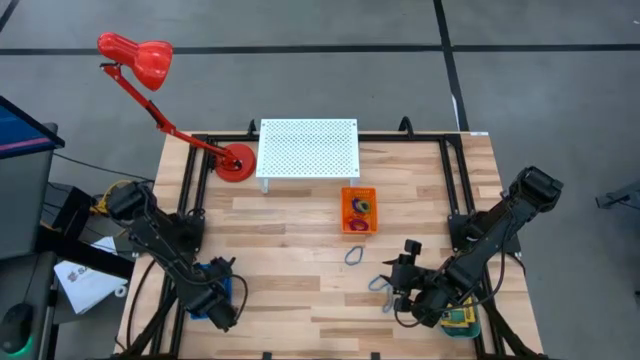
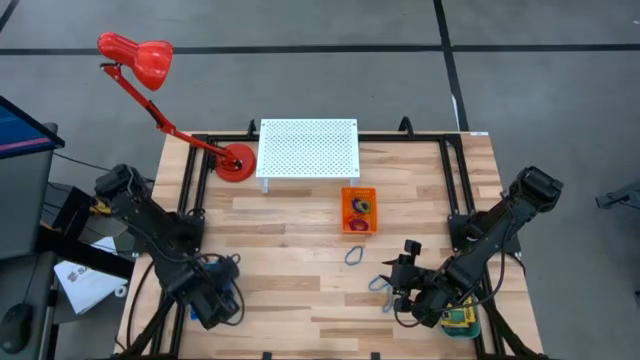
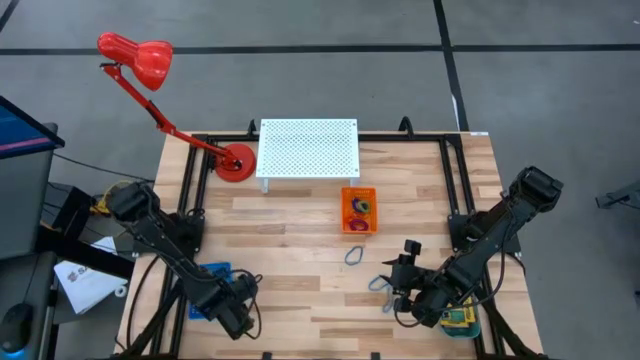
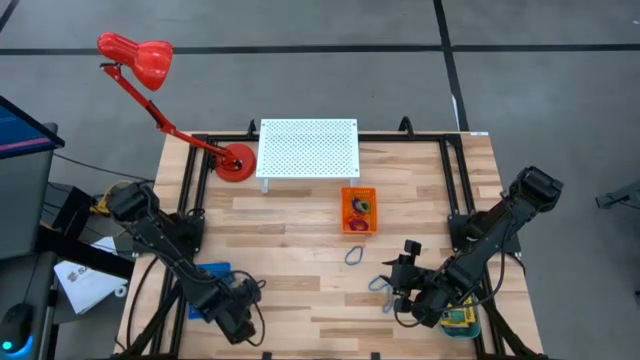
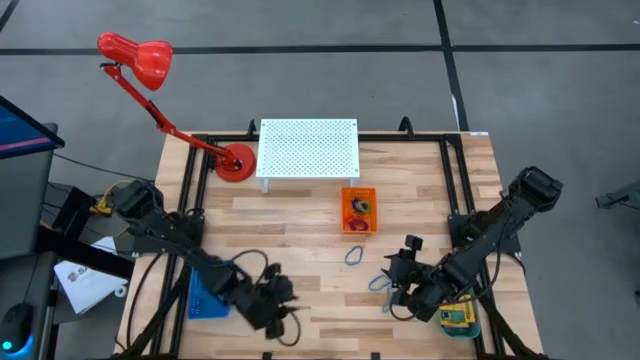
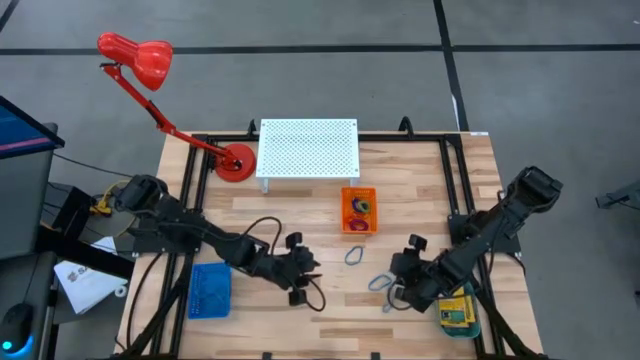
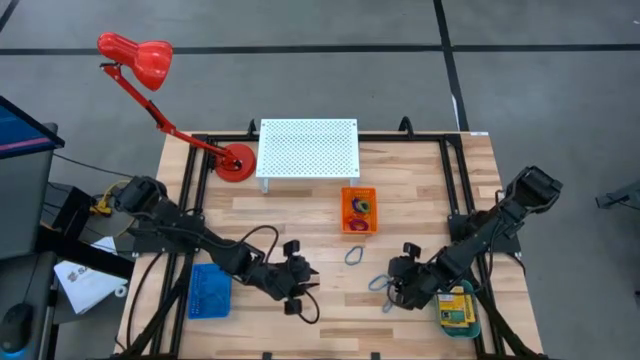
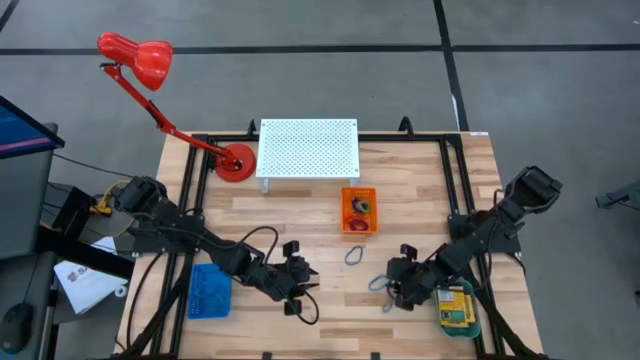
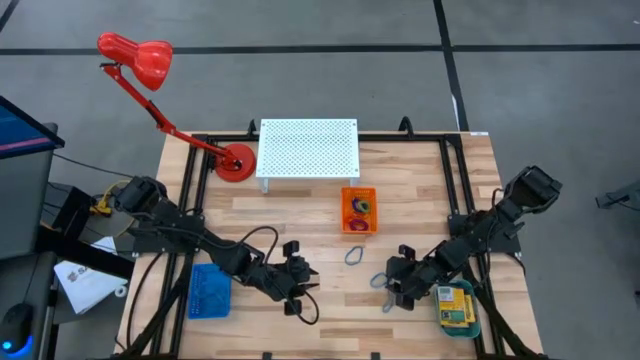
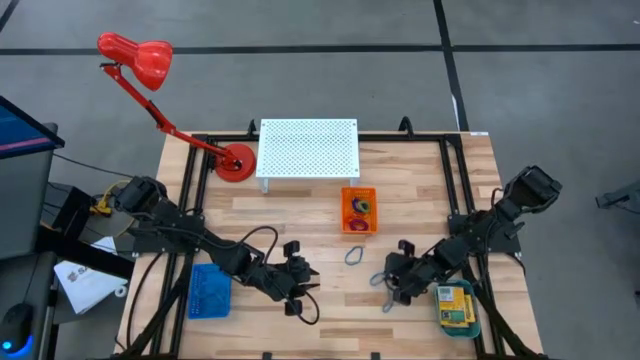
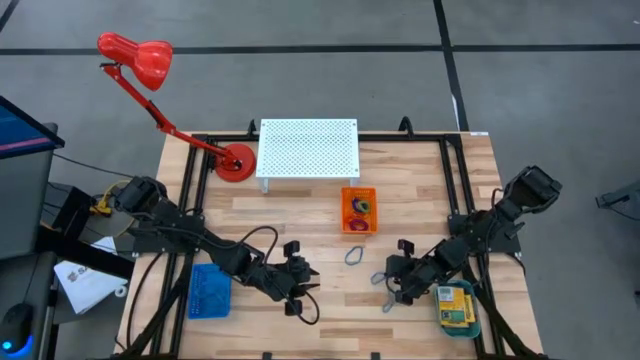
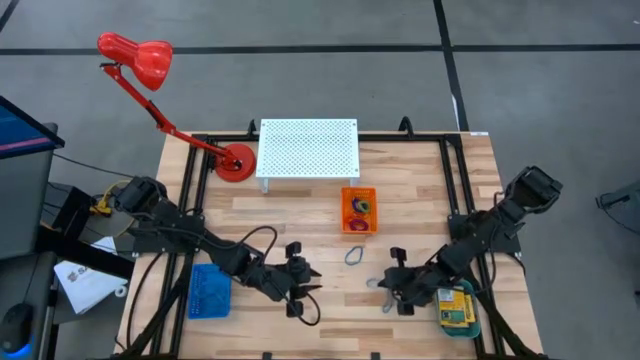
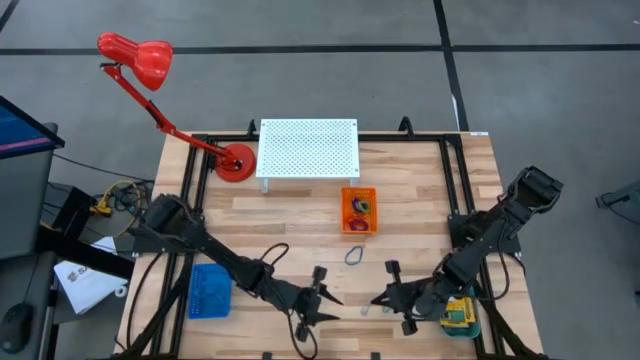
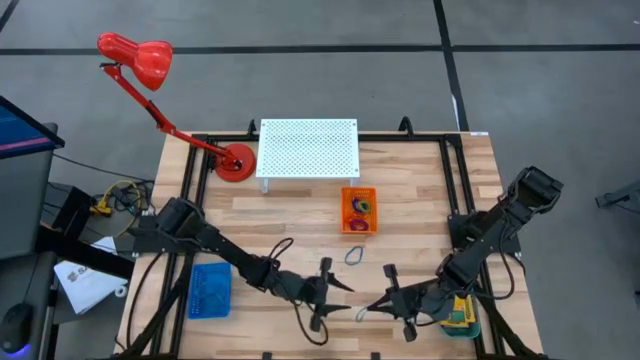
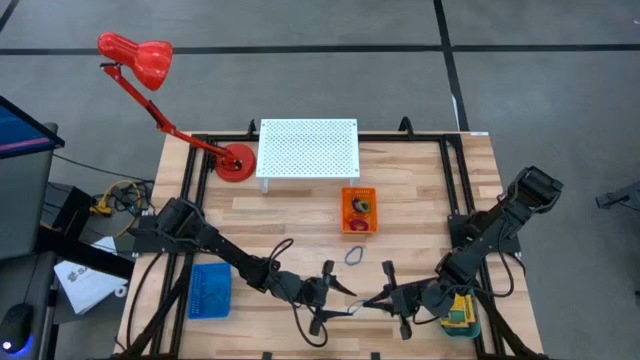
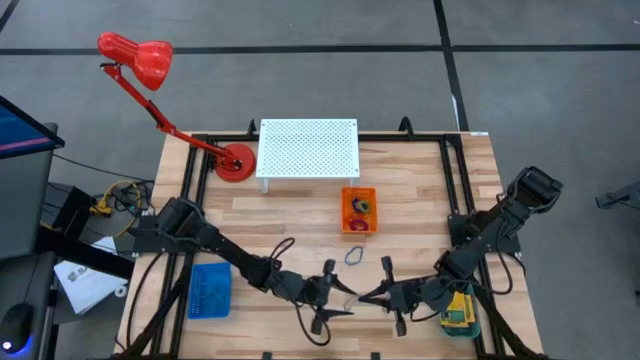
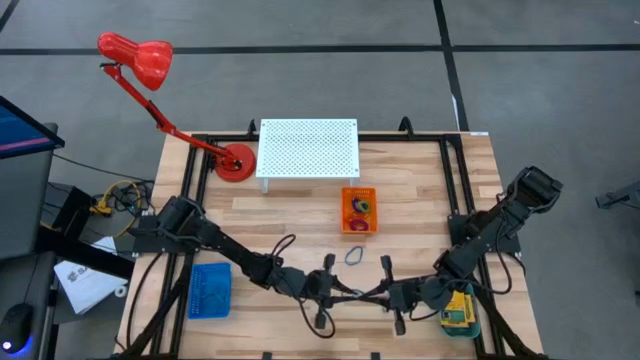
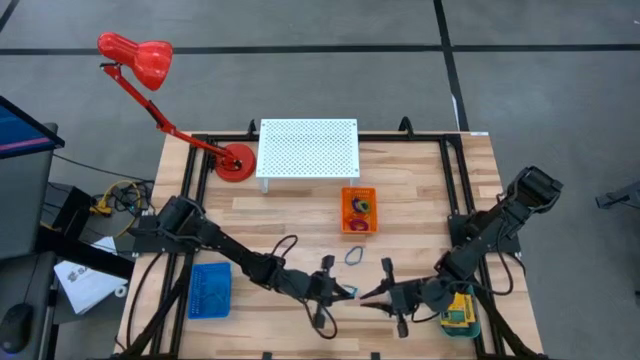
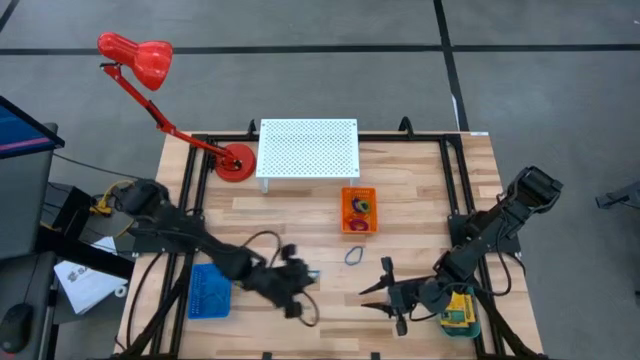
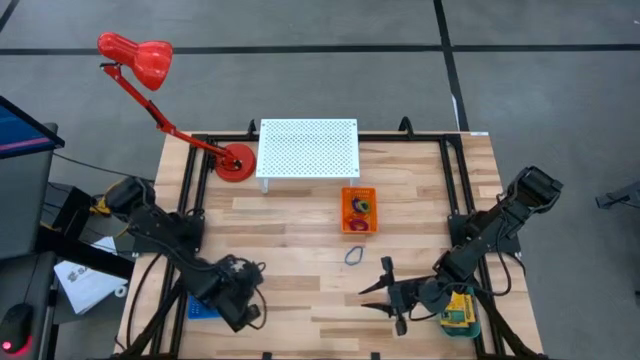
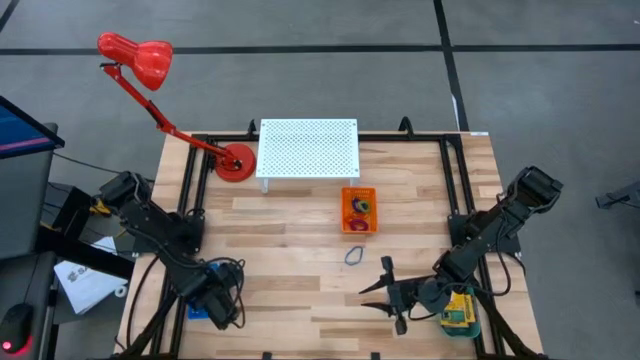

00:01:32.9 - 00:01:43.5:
Task: Pick & Place Office Desk Supplies
Put the blue rubber band into the blue bin

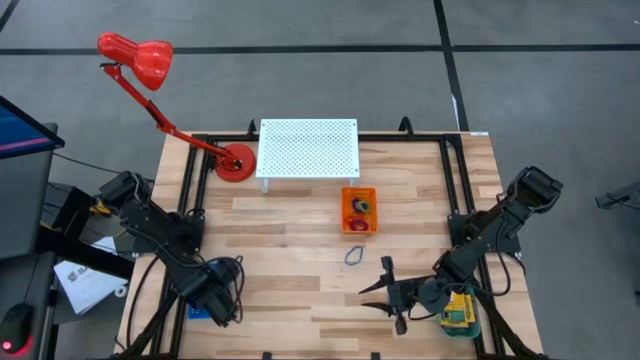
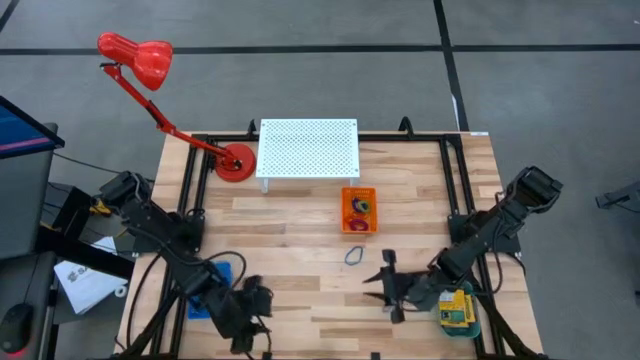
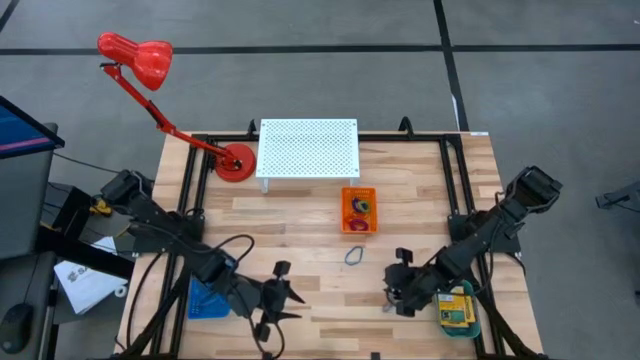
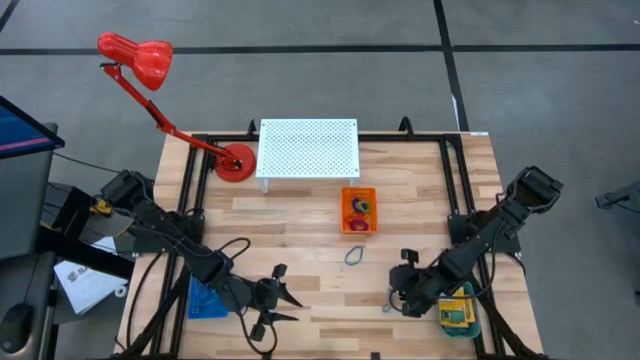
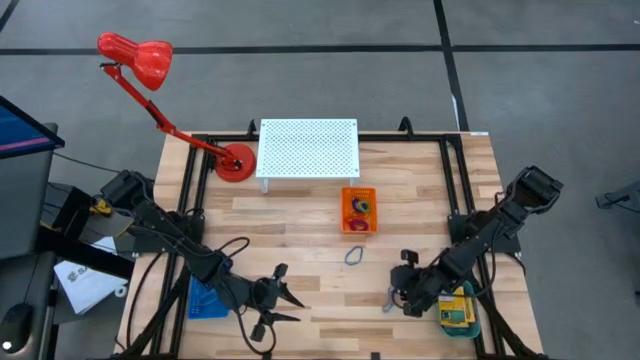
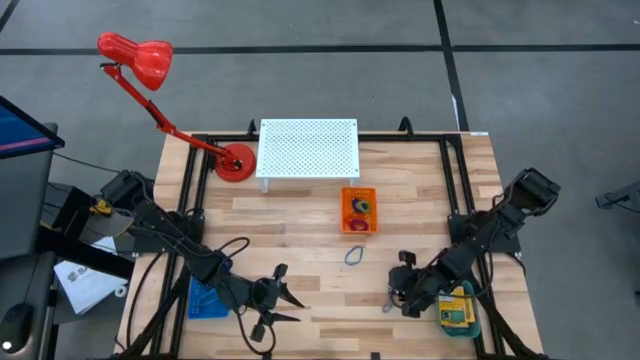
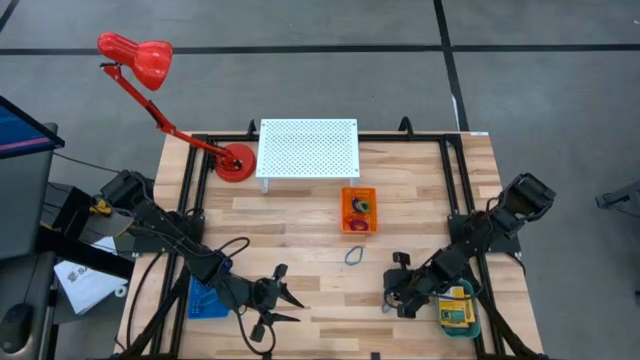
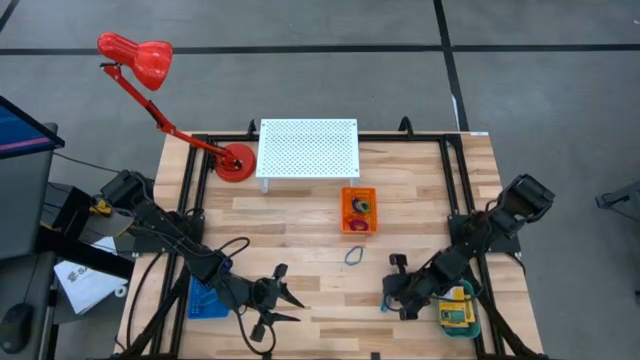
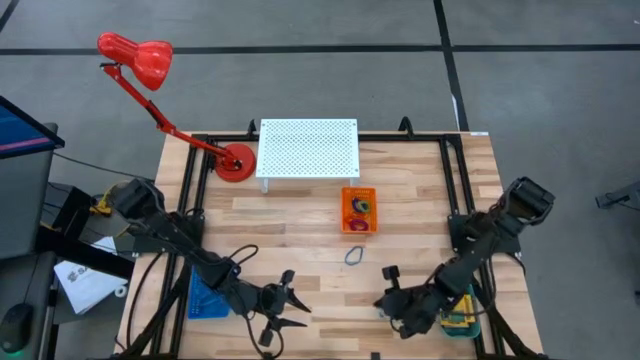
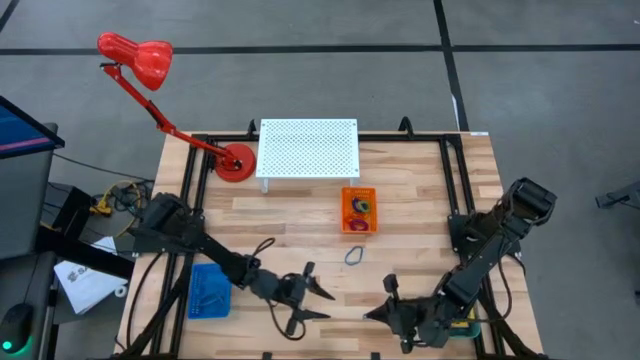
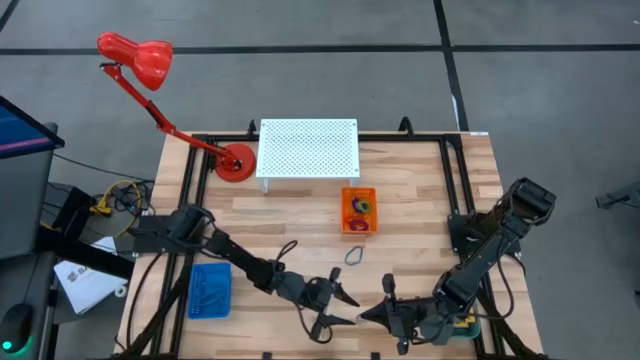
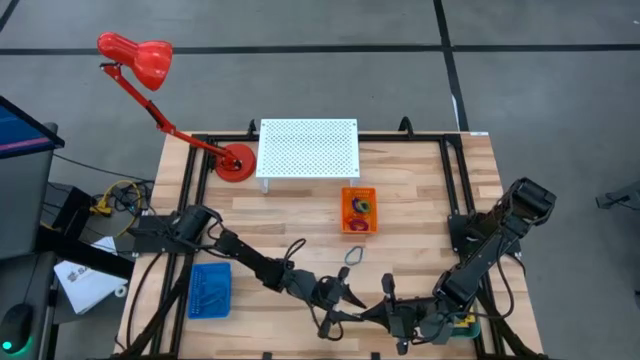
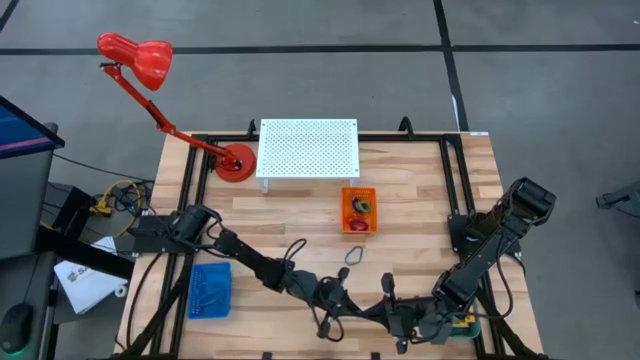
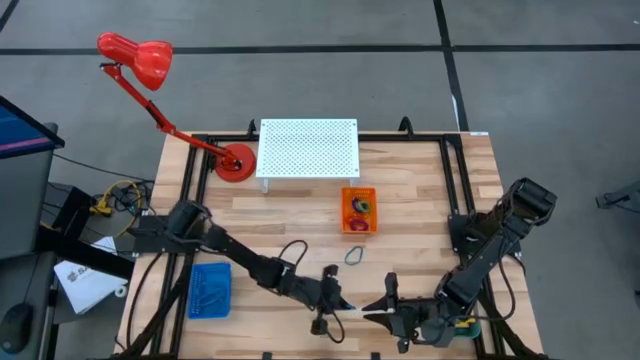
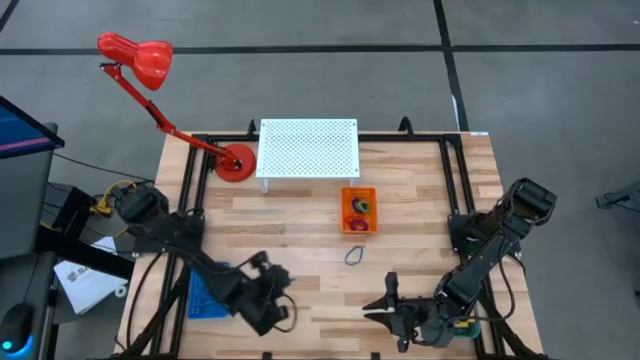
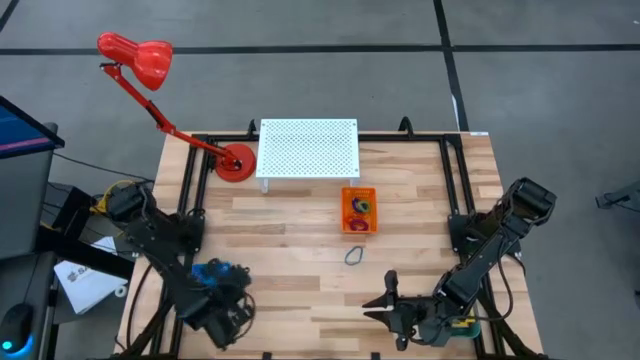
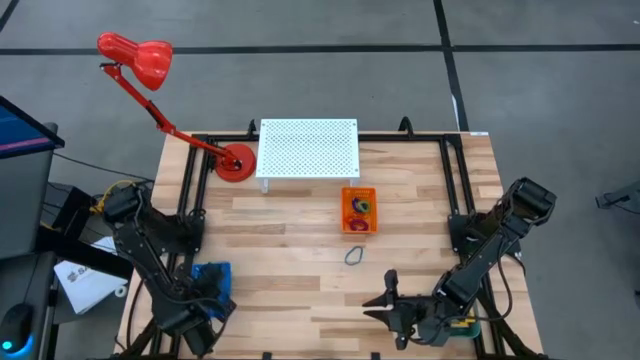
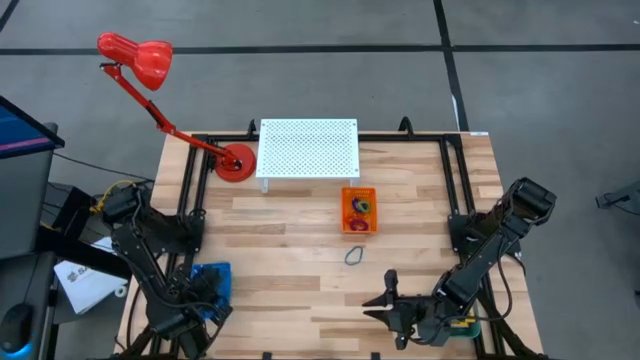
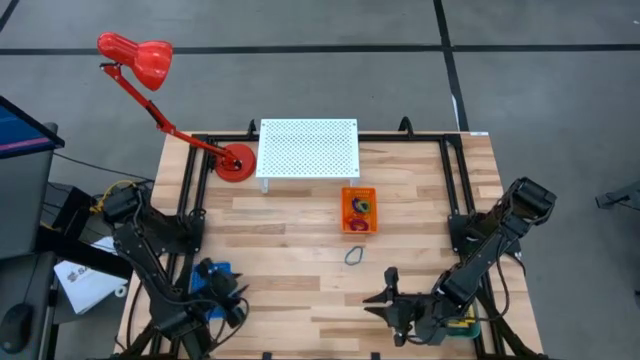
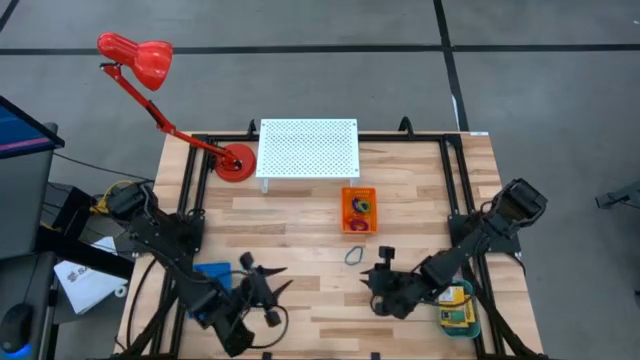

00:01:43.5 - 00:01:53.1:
Put the blue rubber band into the blue bin

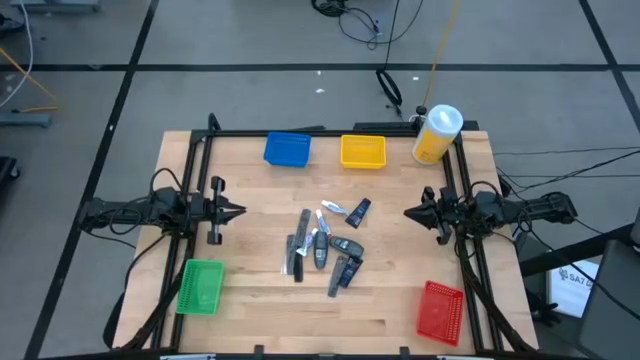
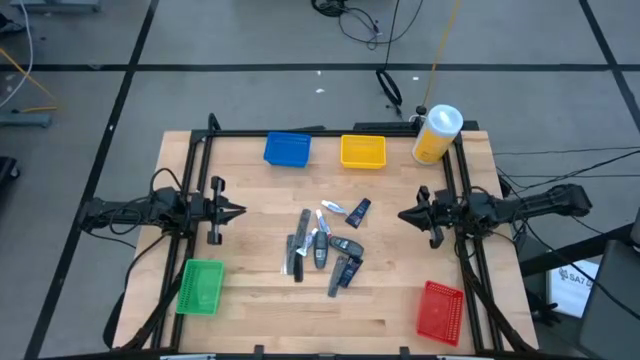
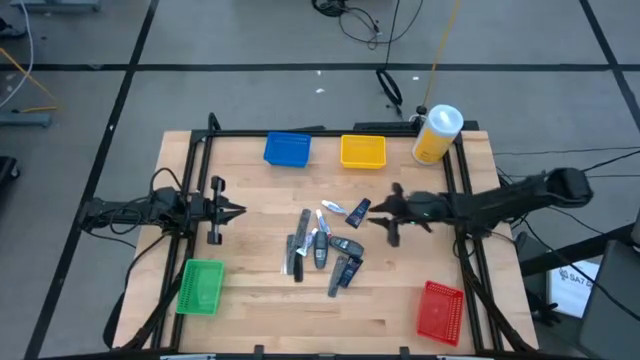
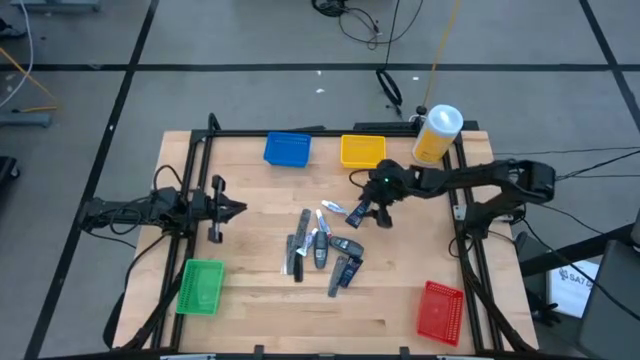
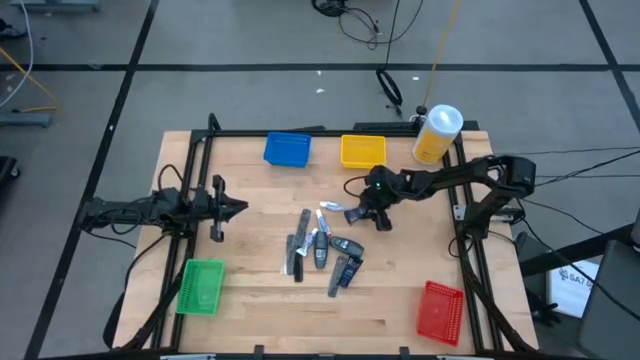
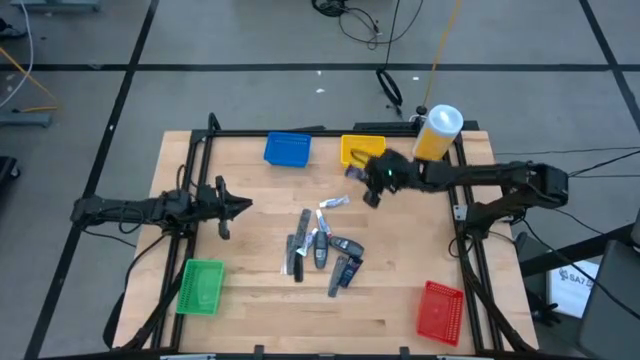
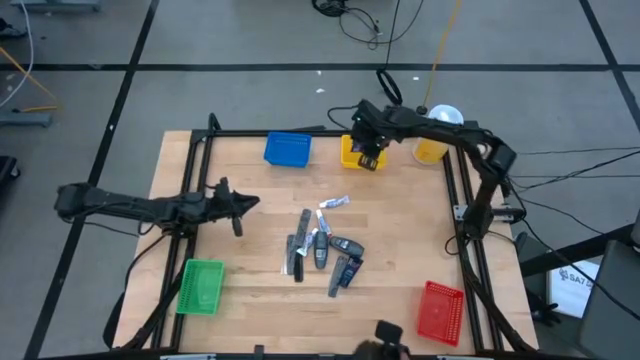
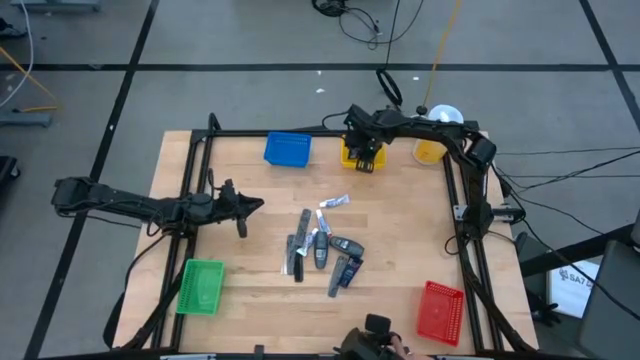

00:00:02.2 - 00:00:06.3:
Task: Pick & Place Travel size toiletries
Put the blue shave cream into the yellow bin
